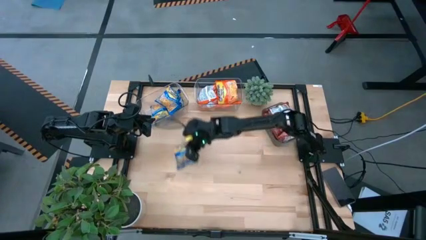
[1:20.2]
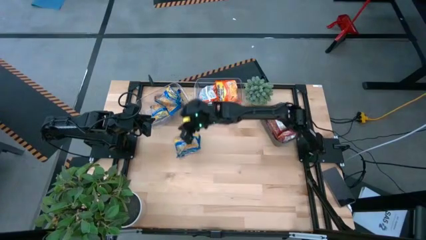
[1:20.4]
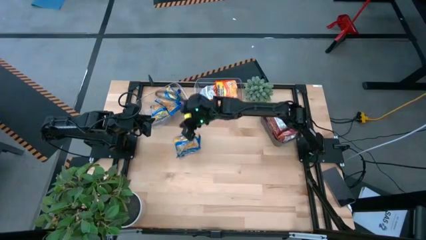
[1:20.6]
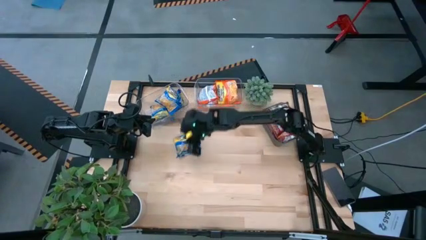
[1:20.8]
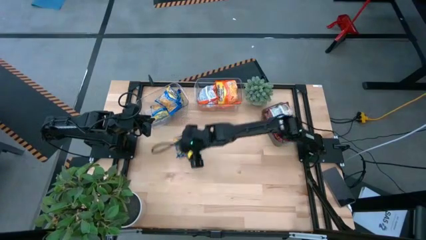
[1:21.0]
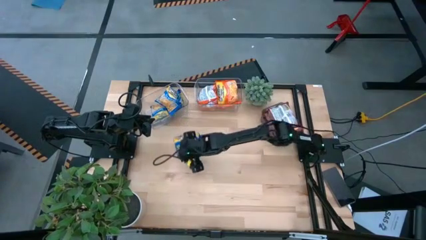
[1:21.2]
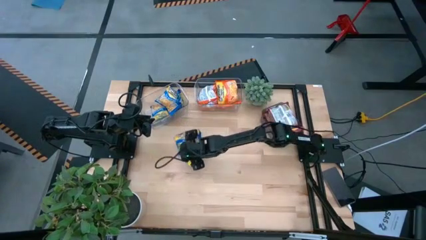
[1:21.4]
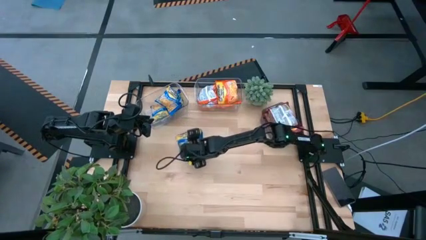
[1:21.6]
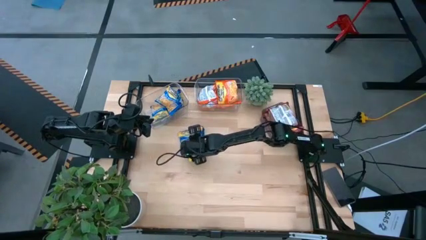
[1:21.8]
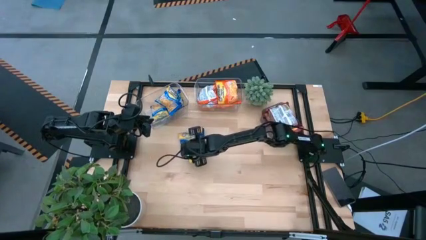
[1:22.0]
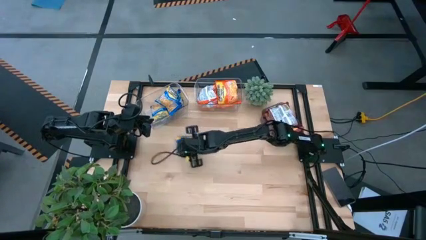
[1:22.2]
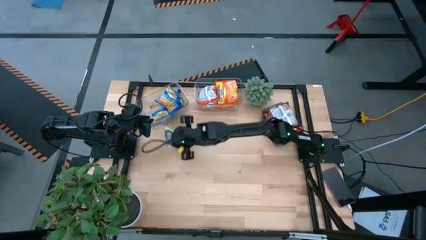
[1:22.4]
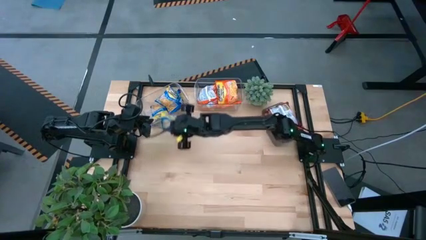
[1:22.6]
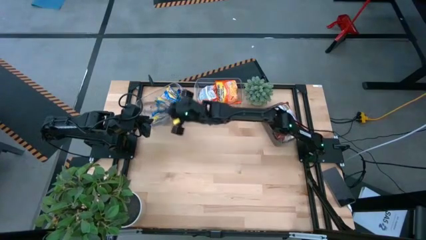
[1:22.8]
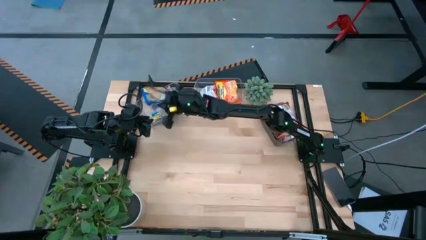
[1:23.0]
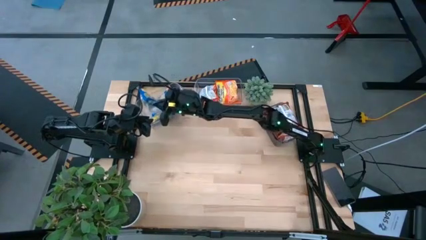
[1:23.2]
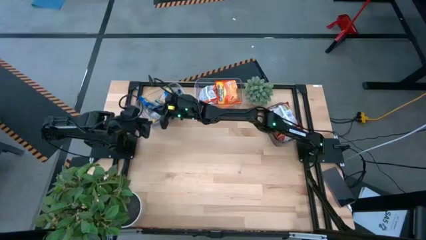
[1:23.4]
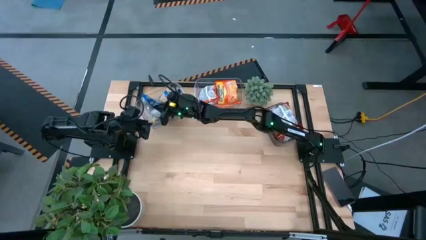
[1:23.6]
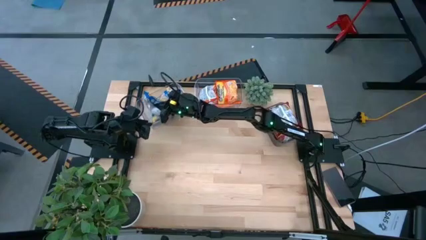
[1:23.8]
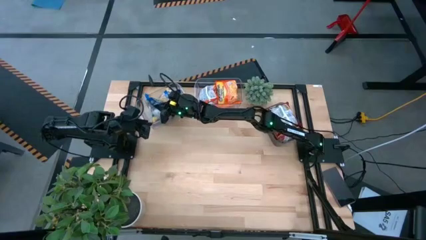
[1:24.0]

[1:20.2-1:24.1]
Task: Sort Maruchan noodles
Put the blue noodle pack into the left transparent bin

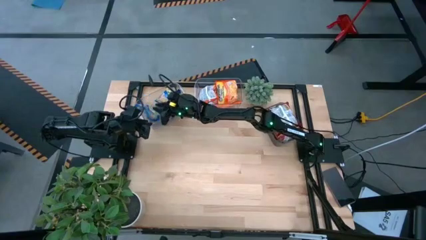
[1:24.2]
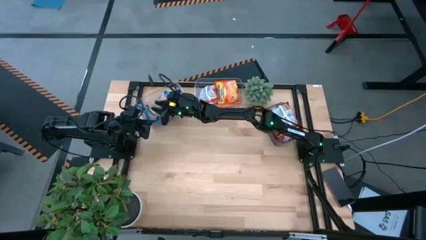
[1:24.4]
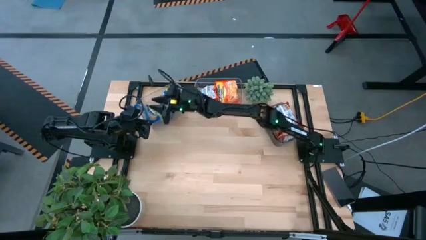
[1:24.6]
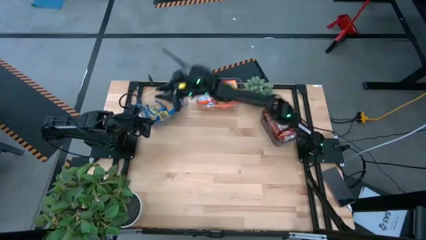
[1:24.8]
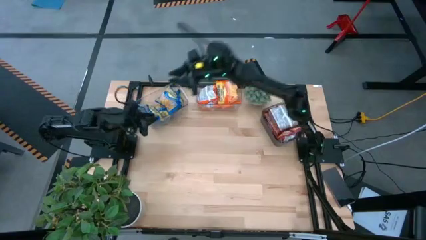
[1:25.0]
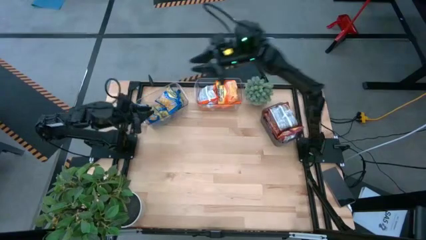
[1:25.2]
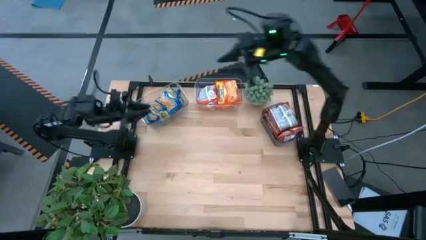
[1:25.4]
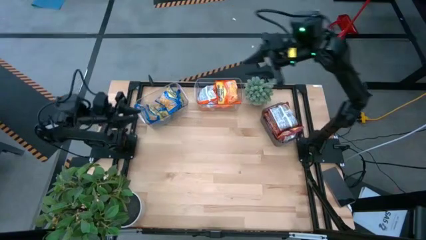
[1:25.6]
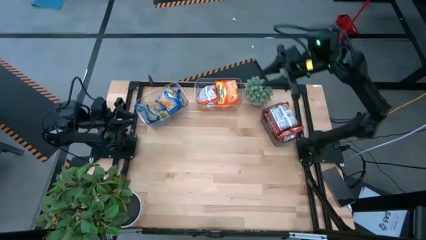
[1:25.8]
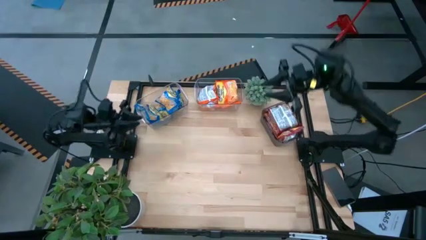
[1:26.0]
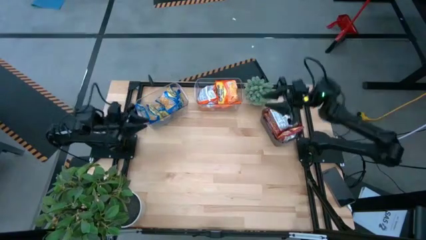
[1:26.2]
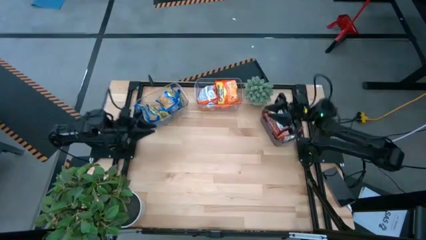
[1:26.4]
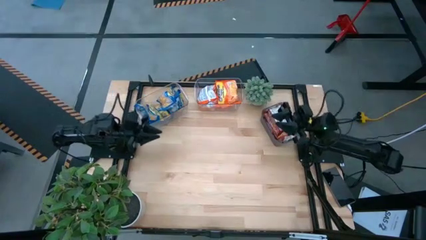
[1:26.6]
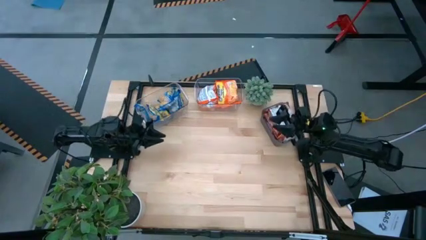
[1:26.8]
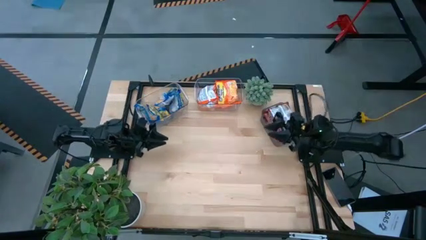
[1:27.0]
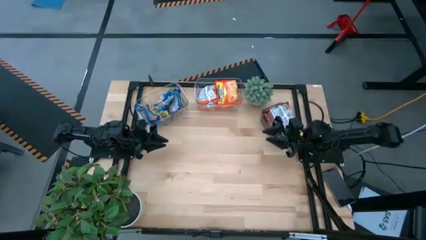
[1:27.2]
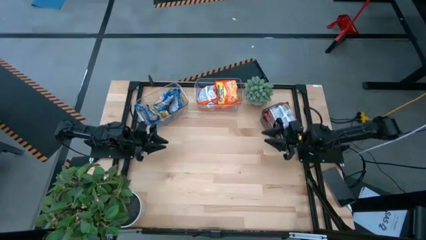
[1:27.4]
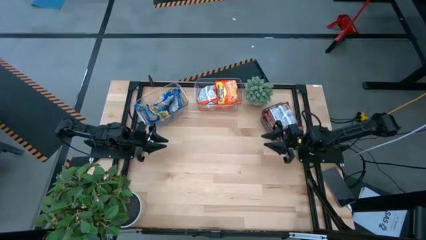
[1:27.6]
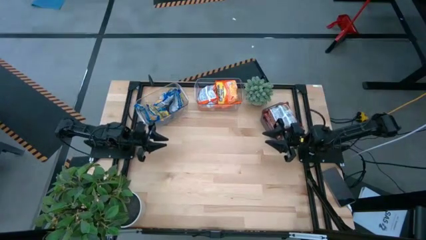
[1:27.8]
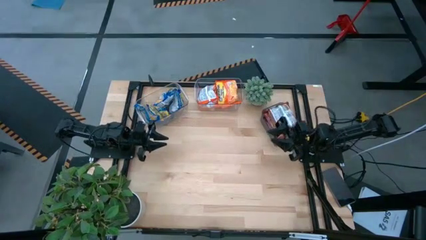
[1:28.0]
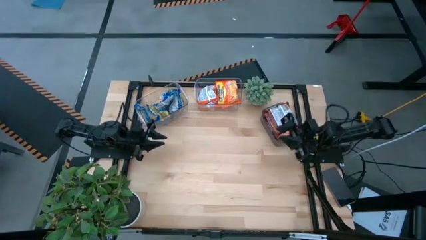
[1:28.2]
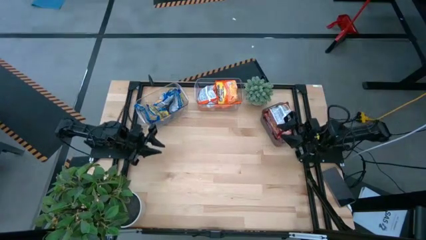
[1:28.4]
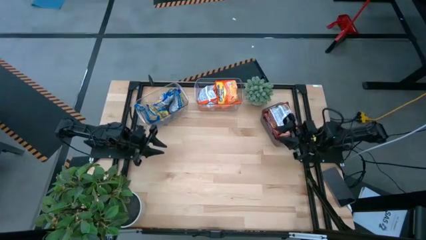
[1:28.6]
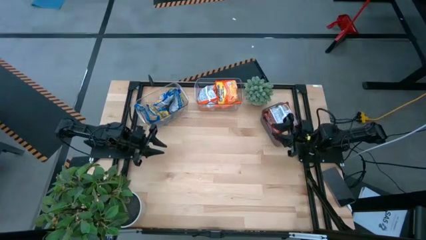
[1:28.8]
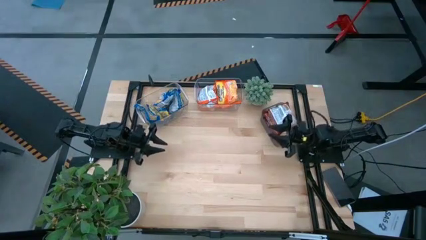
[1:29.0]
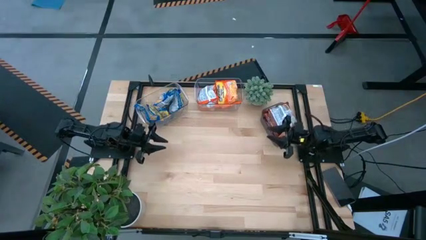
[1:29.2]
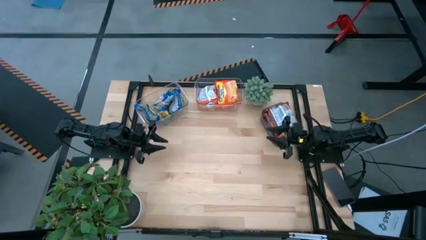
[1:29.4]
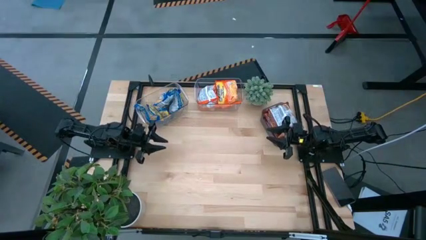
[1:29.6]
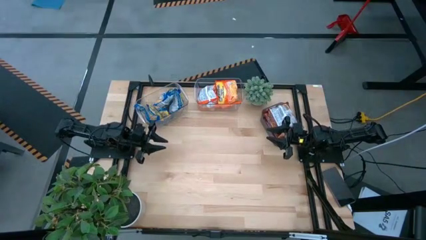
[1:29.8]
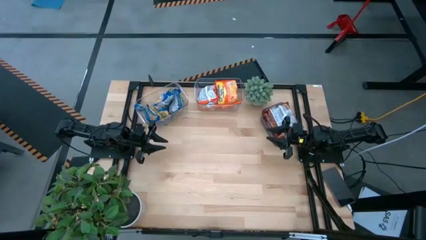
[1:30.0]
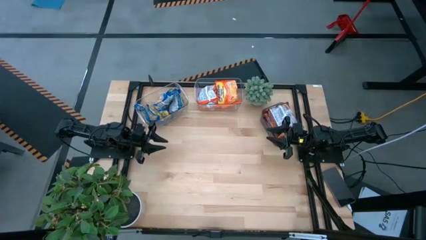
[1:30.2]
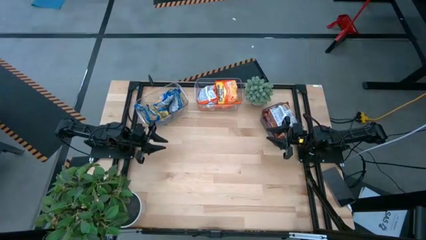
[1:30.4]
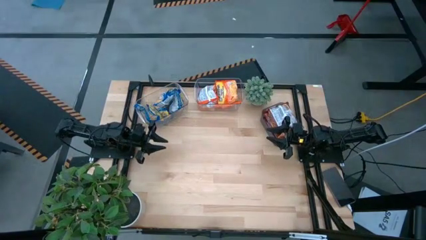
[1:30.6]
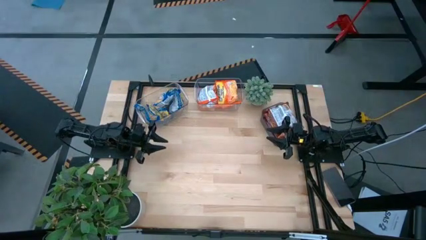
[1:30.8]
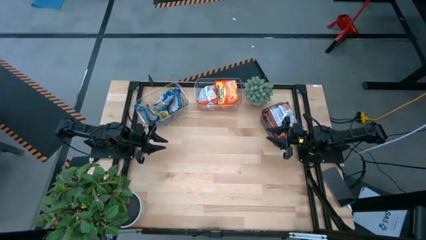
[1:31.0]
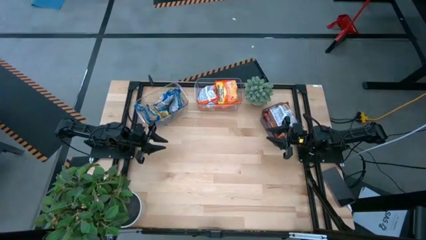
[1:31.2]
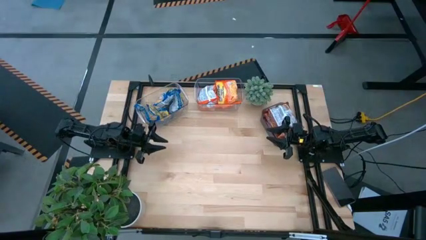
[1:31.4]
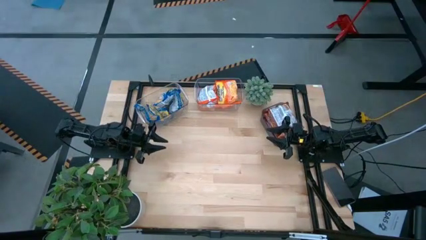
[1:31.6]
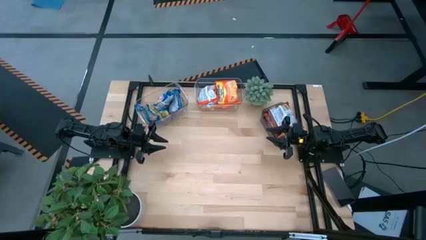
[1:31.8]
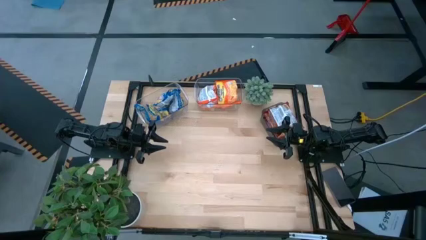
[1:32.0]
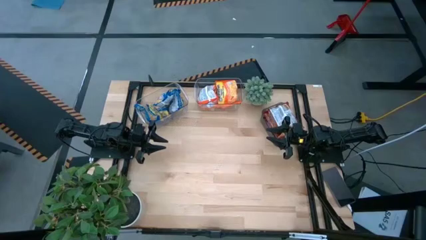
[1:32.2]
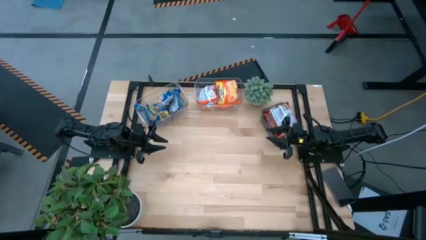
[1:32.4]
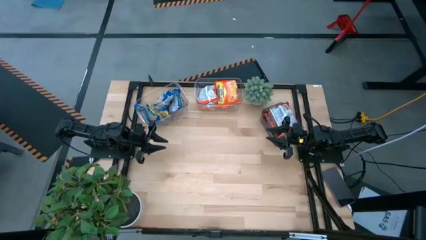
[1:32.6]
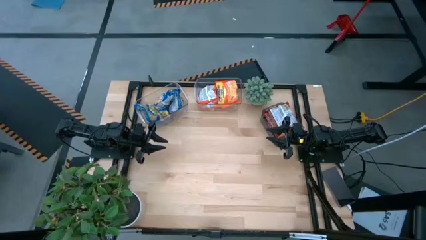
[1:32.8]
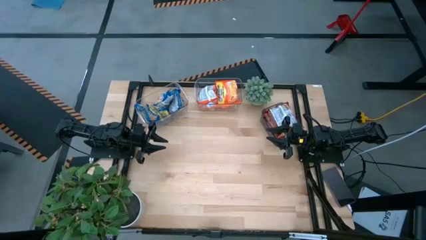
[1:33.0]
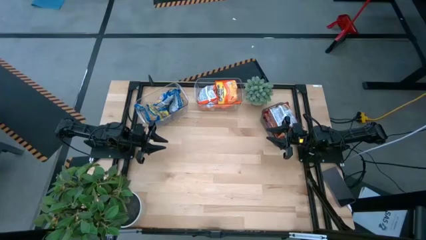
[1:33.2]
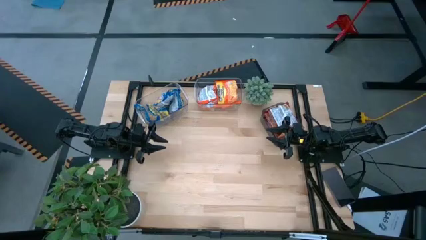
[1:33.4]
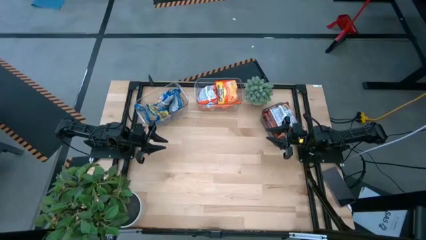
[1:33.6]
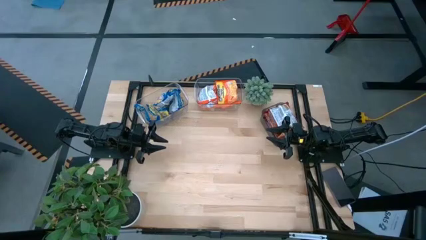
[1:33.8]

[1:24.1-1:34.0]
Return to Home Position
